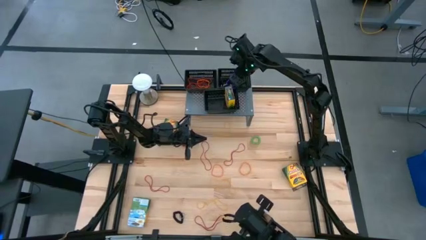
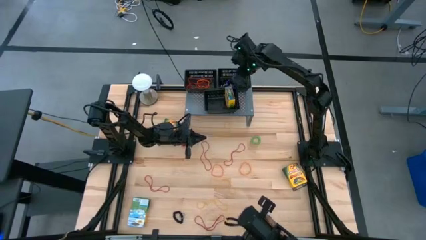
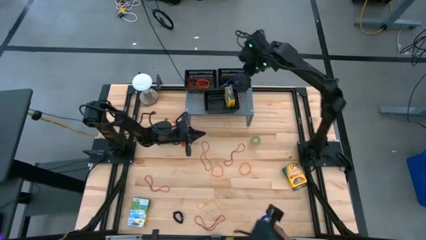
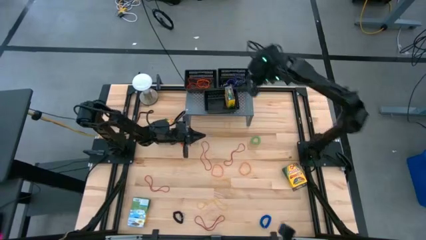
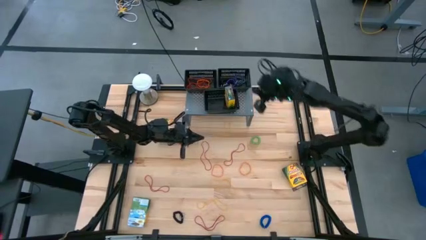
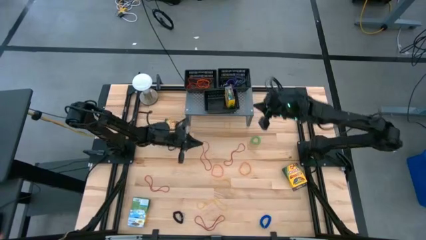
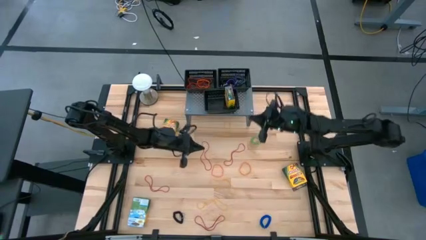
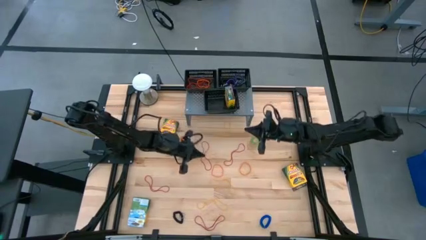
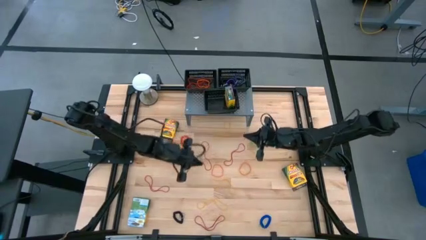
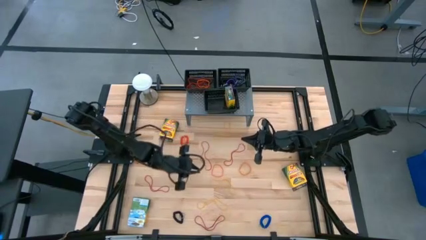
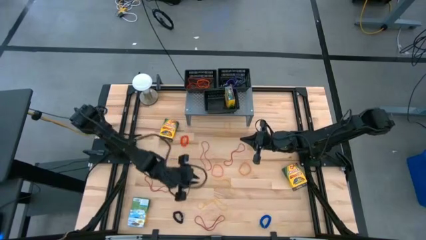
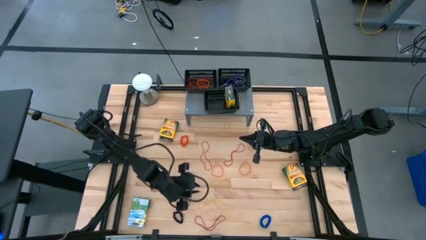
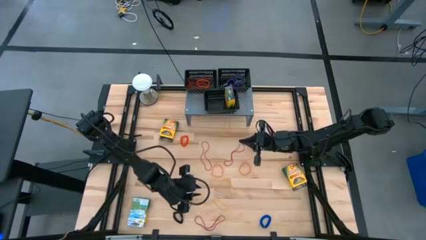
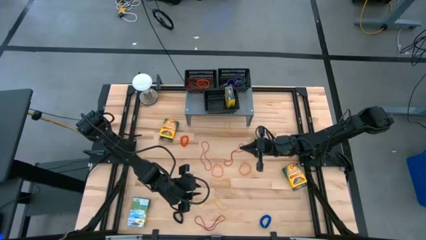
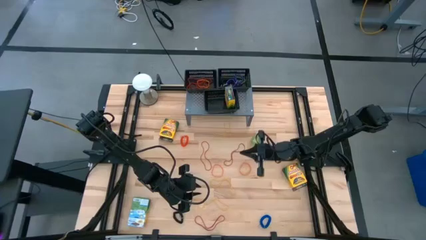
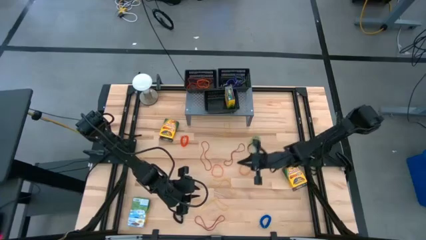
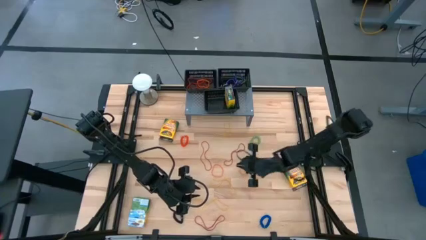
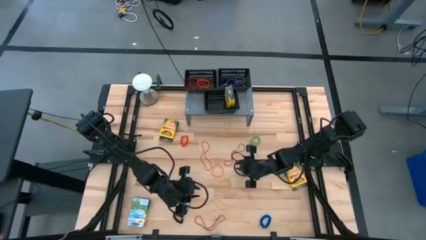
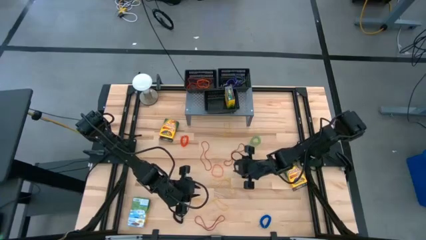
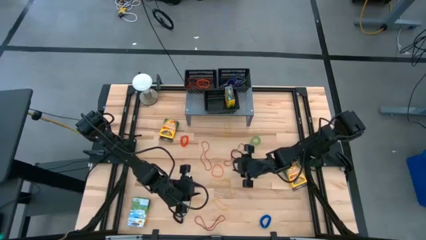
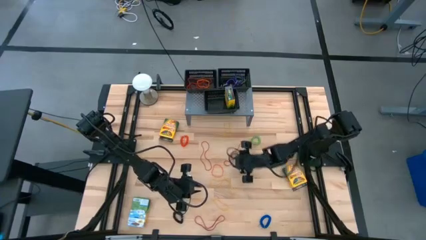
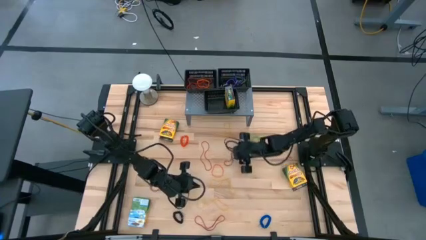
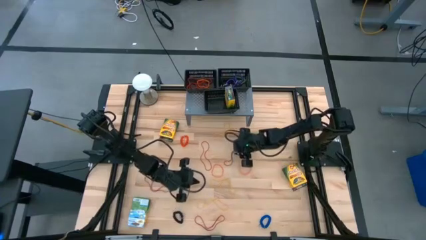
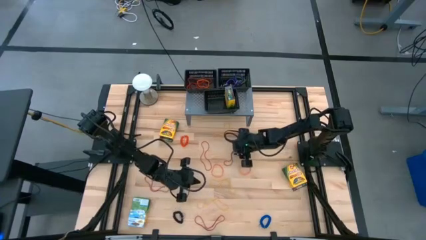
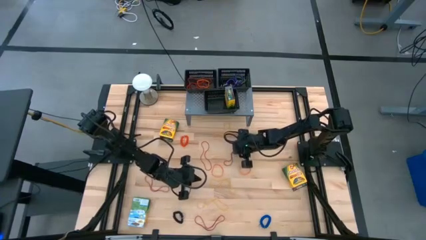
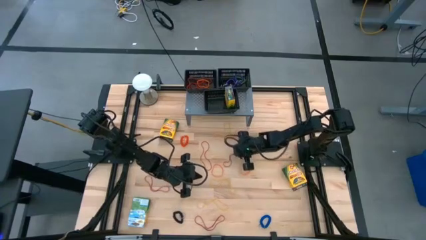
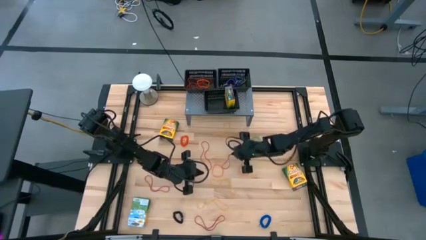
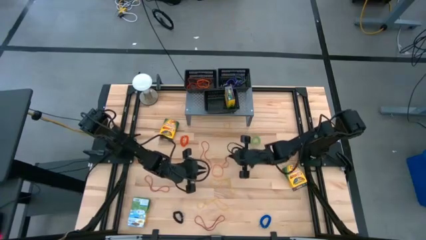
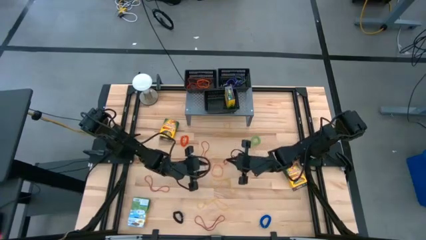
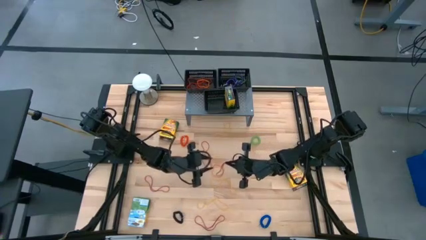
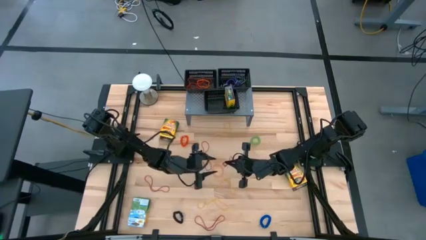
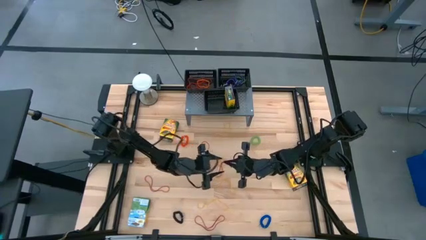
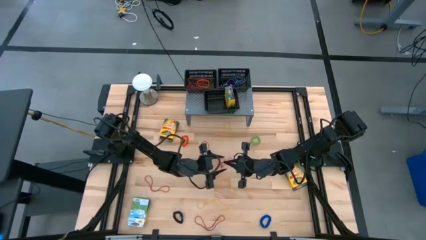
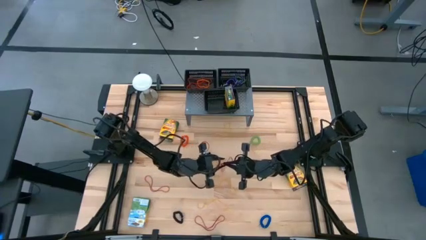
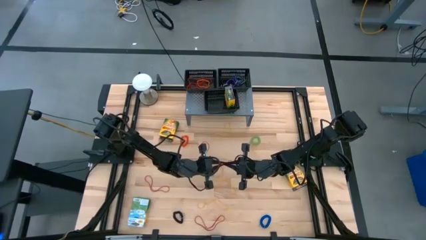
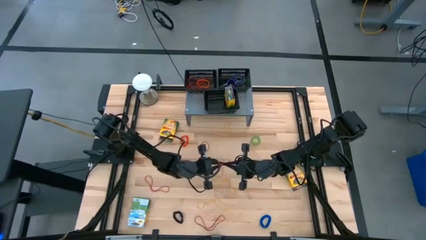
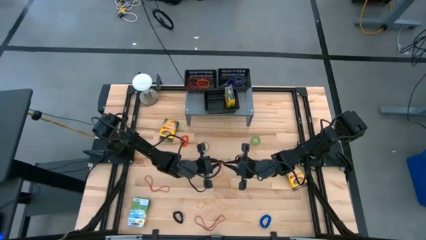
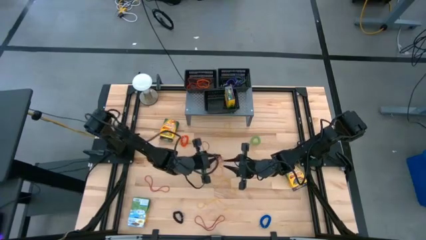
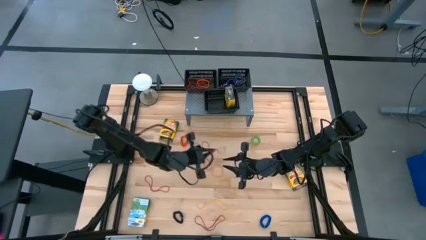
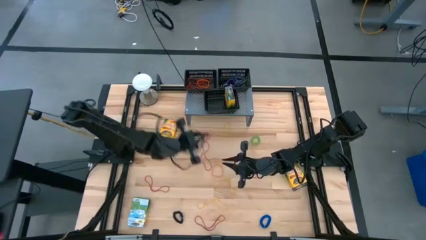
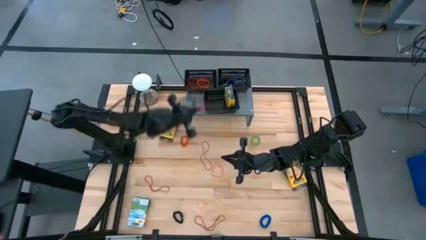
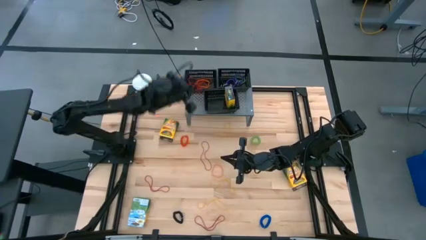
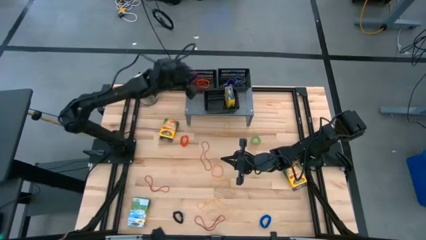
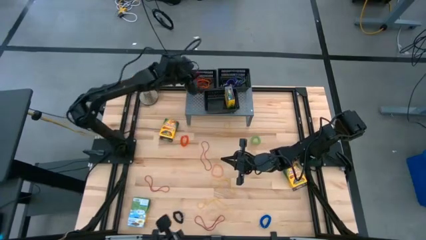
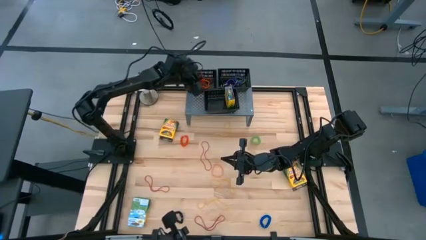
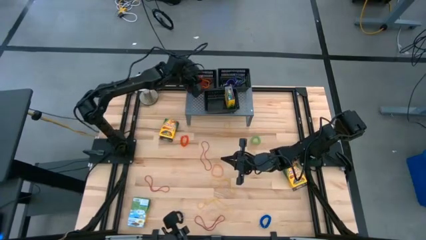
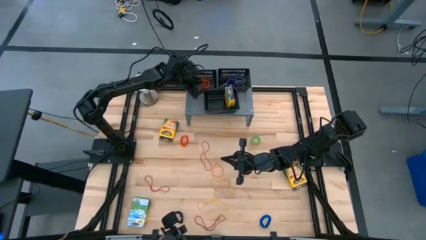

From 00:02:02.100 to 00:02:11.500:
Task: Pick & Place Office Desk Supplies
Put the red rubber band into the top left black basket on the shelf

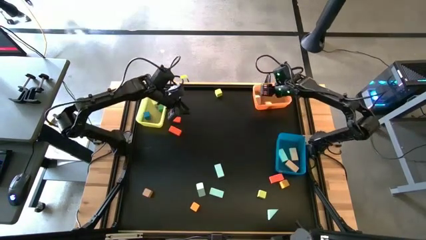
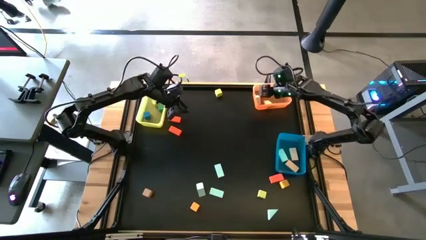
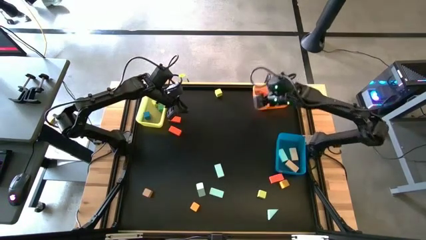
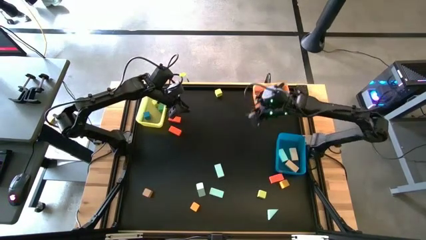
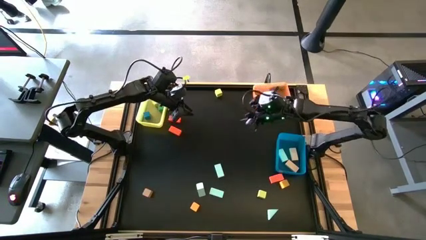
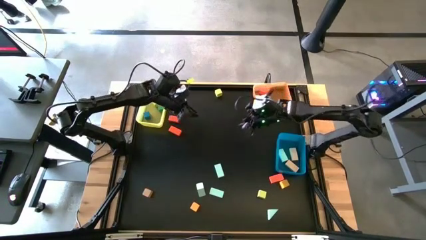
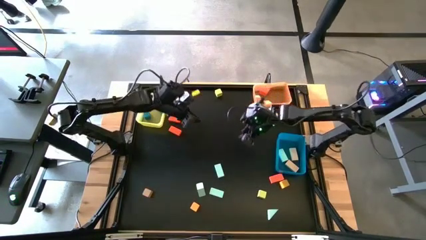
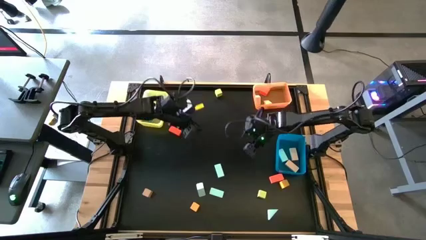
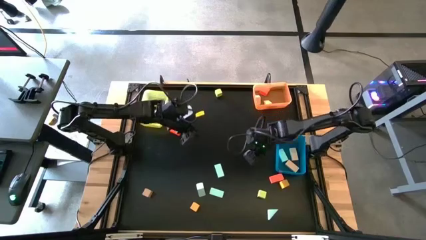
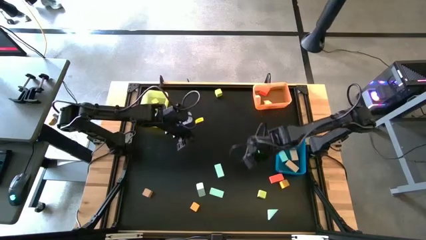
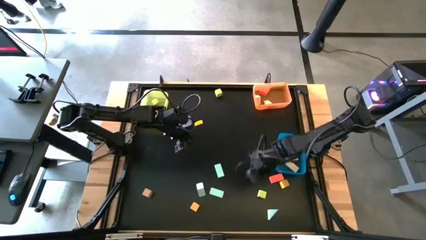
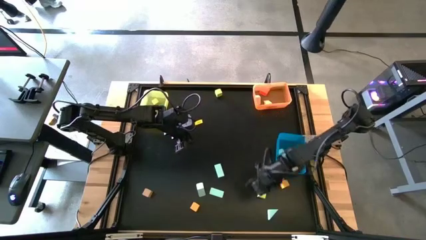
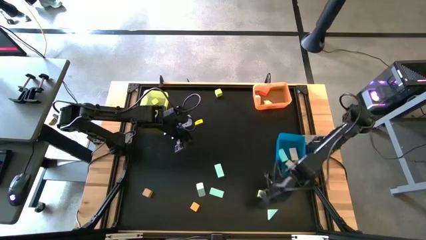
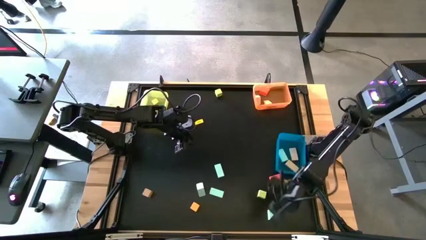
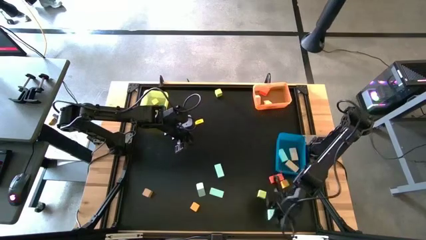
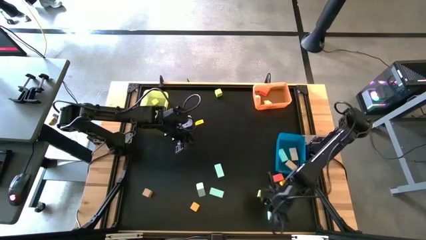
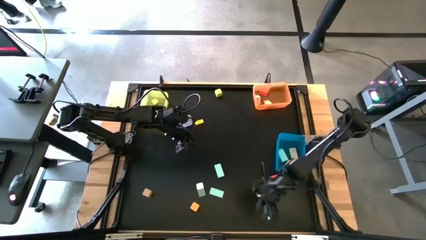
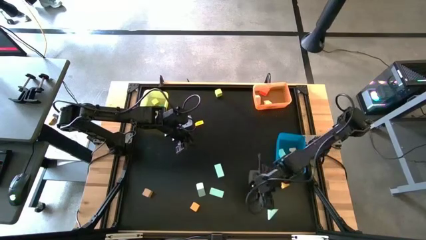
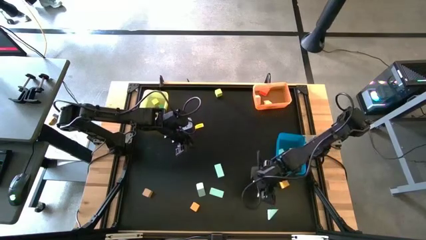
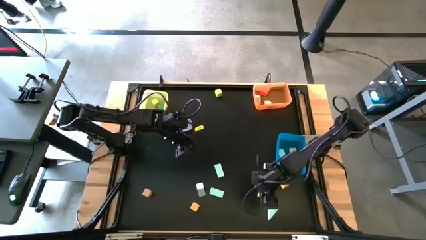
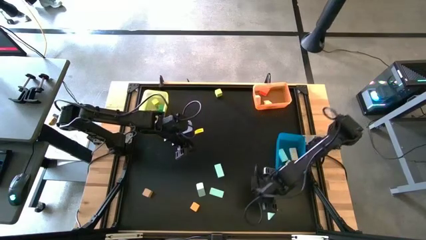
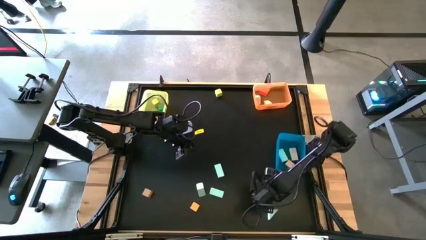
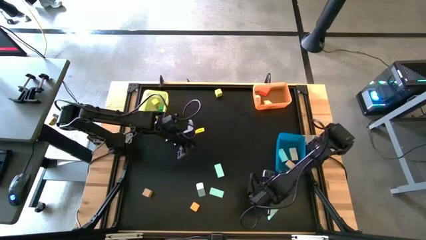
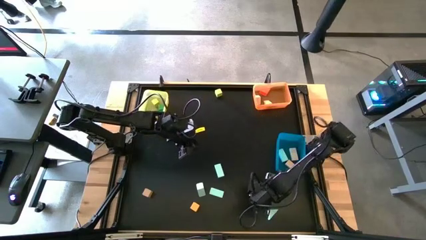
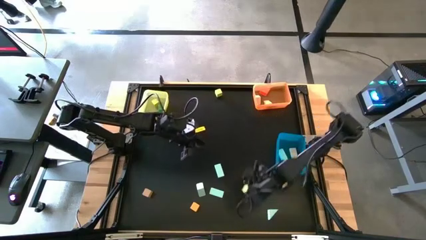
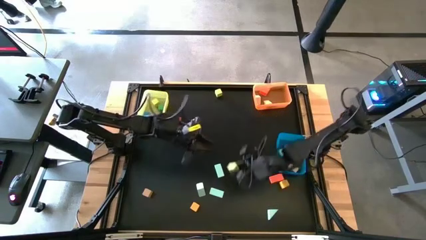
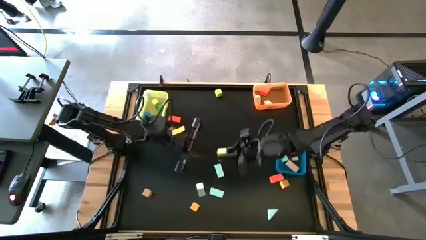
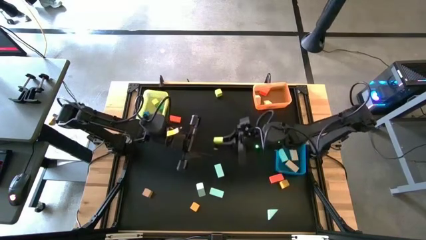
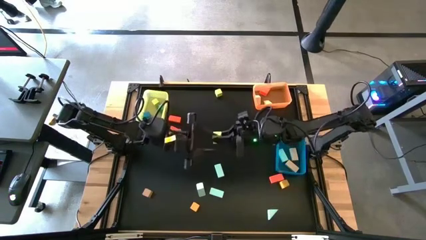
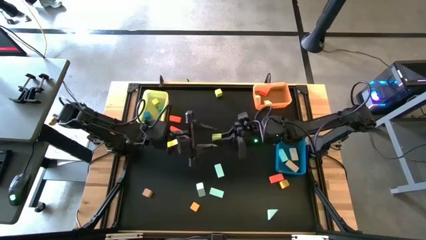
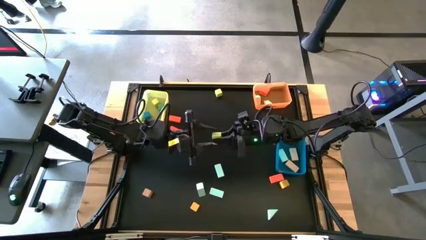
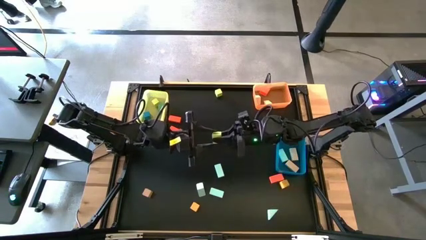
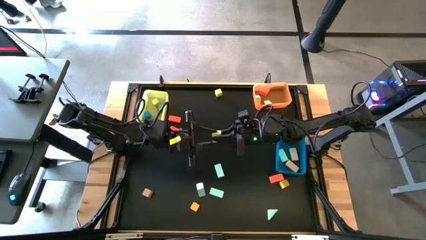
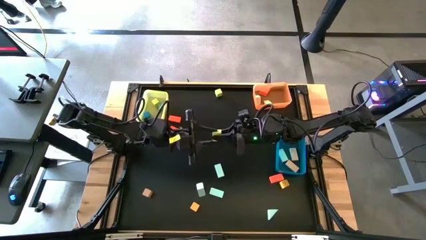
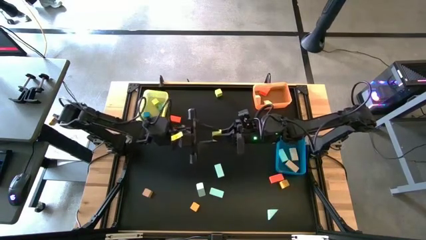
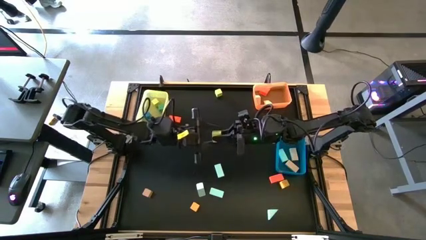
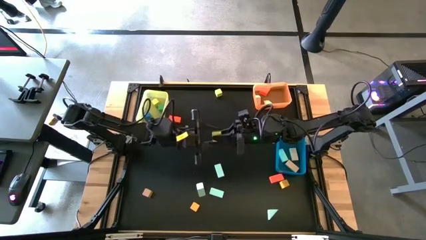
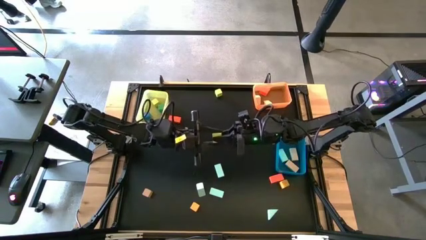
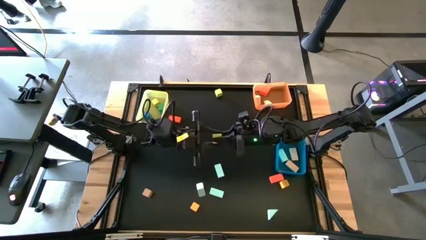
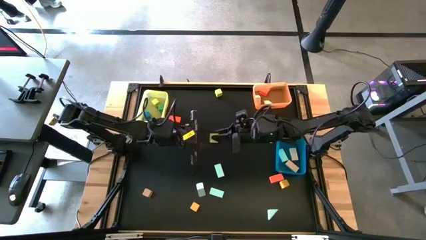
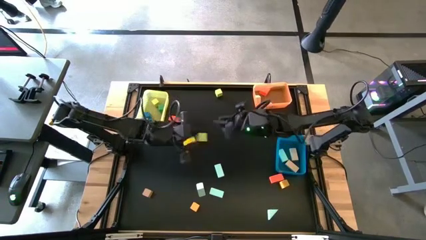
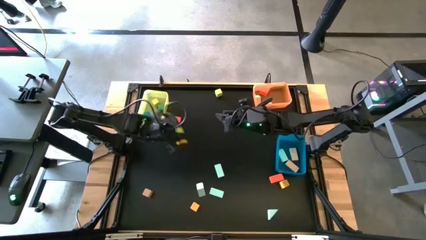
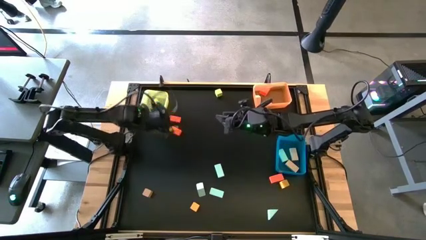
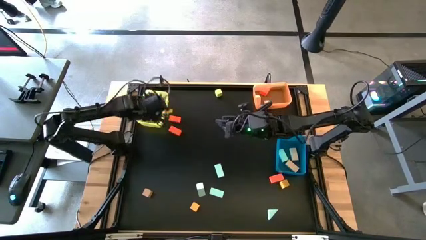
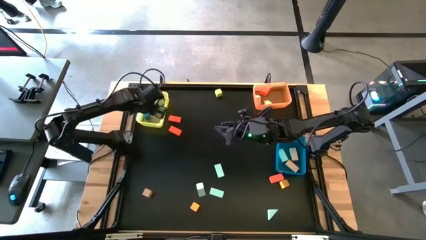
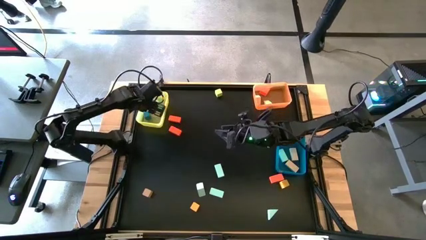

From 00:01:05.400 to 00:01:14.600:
Task: Sort blocks by size
Put the yellow square block into the yellow bin
